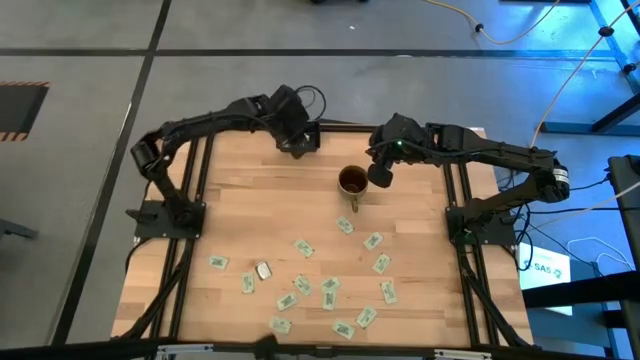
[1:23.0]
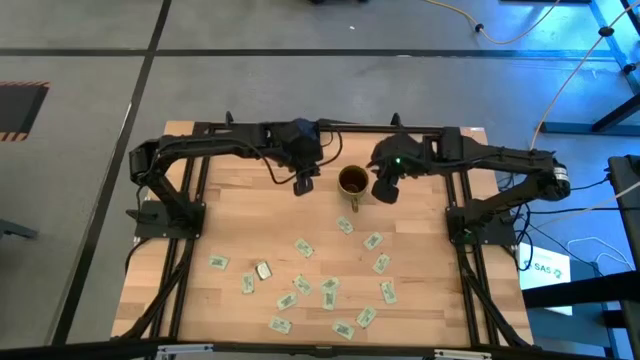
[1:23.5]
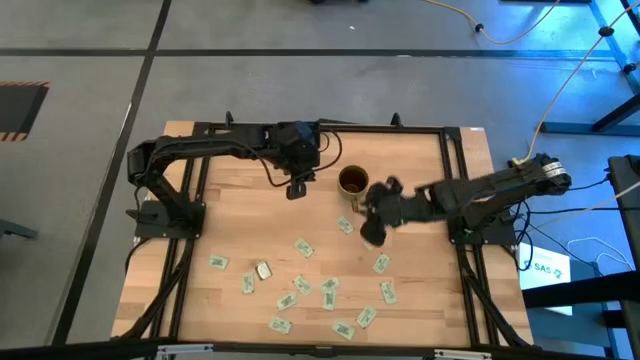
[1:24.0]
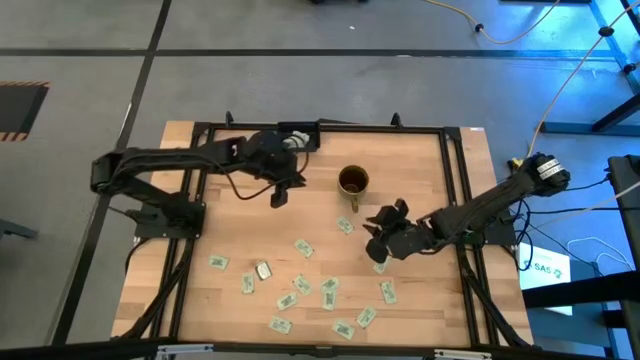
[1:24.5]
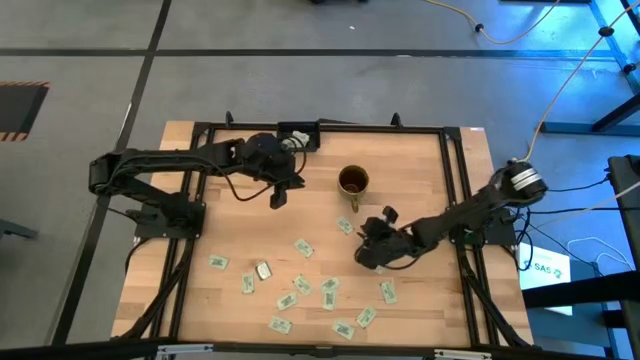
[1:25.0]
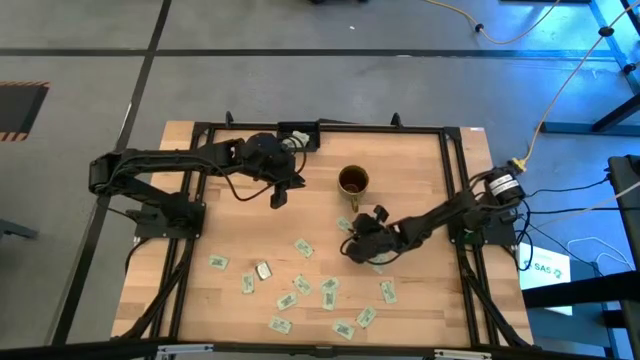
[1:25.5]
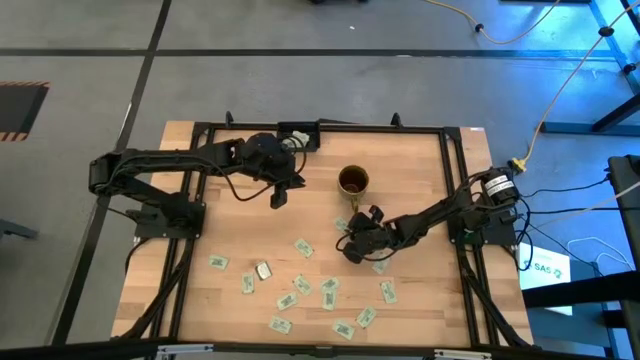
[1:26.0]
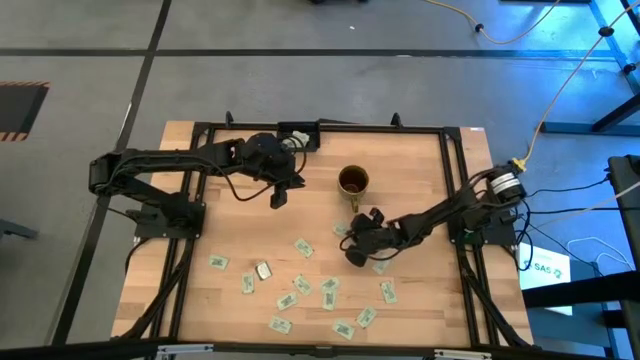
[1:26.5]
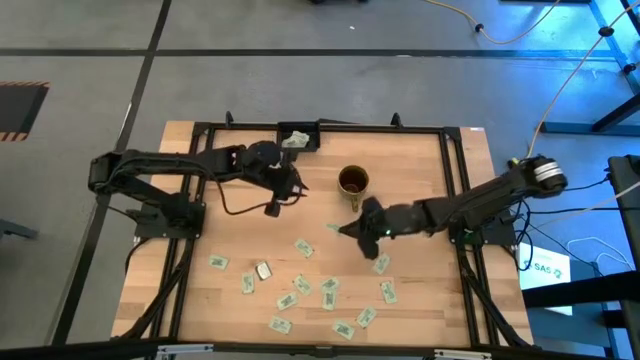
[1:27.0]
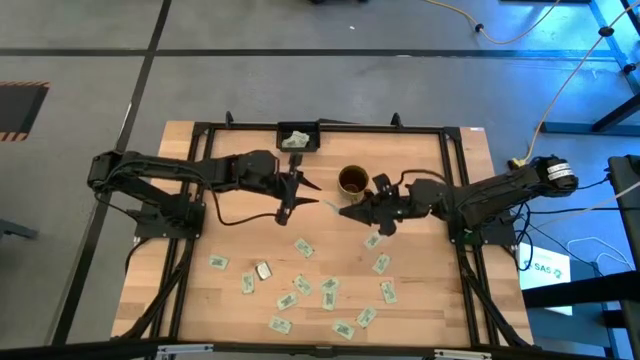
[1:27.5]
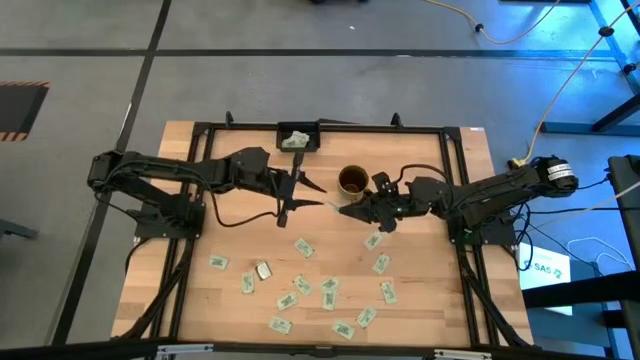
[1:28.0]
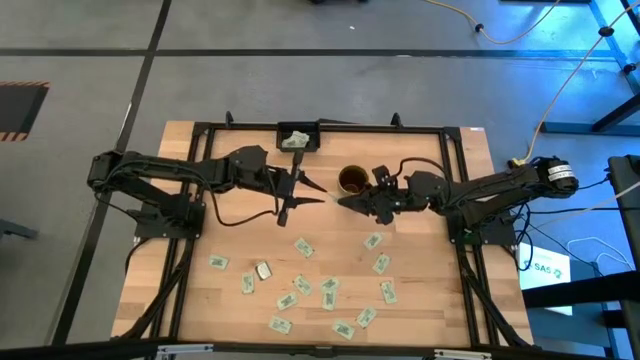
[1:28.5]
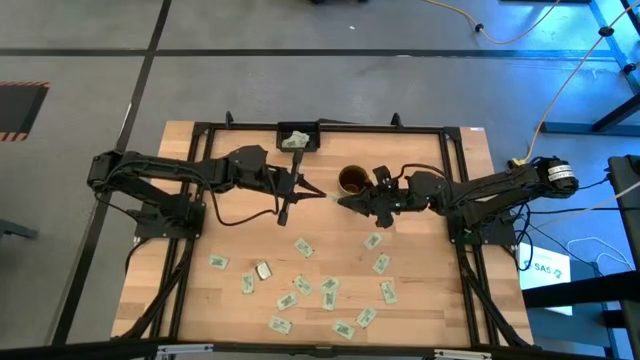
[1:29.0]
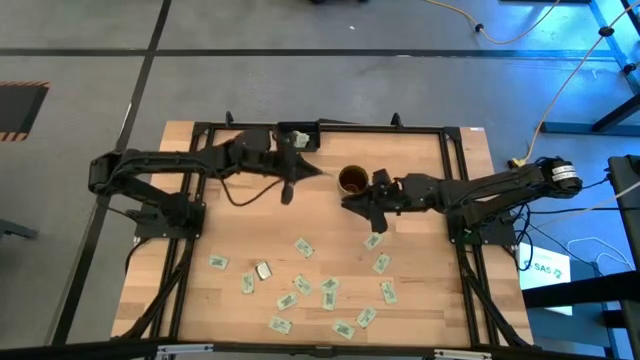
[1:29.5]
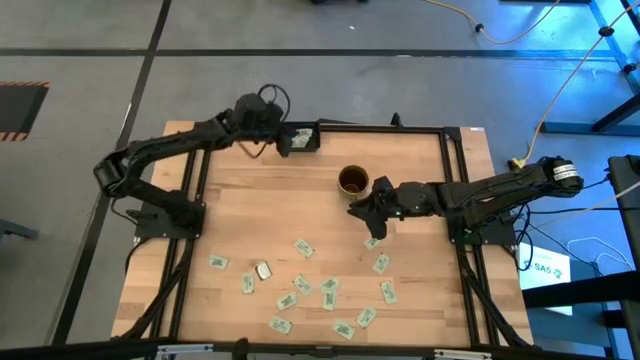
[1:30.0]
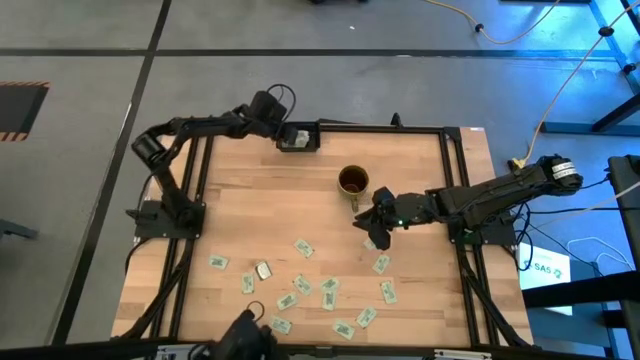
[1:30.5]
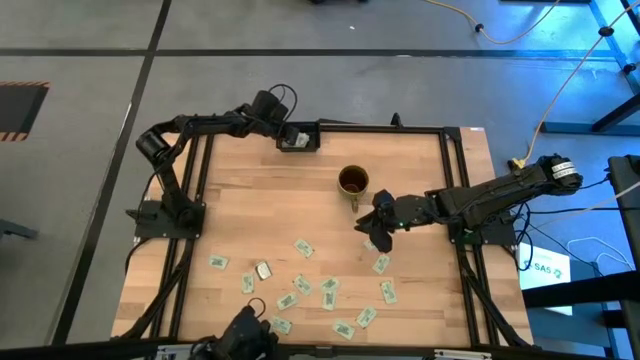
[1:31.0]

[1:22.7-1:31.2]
Task: Pick and place Stevia / Truvia into bins
Put the stevia packet into the black container

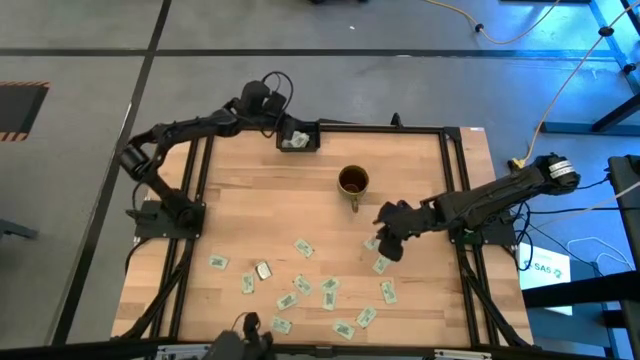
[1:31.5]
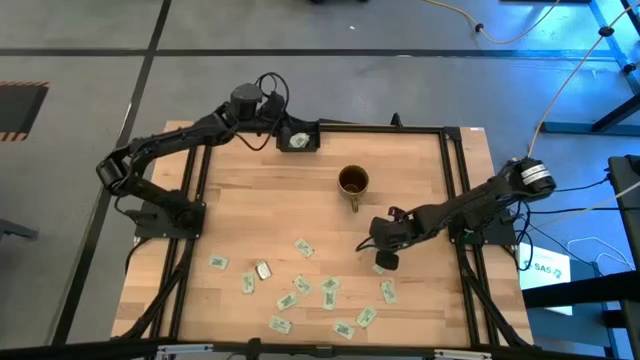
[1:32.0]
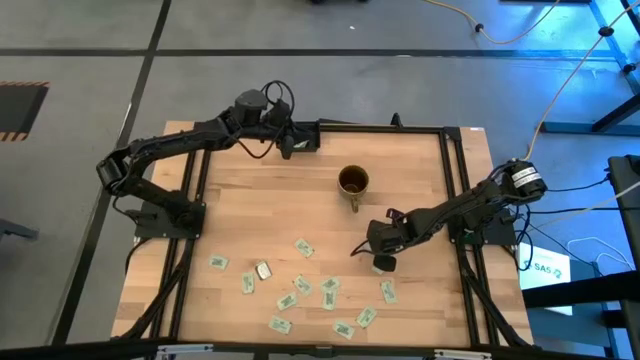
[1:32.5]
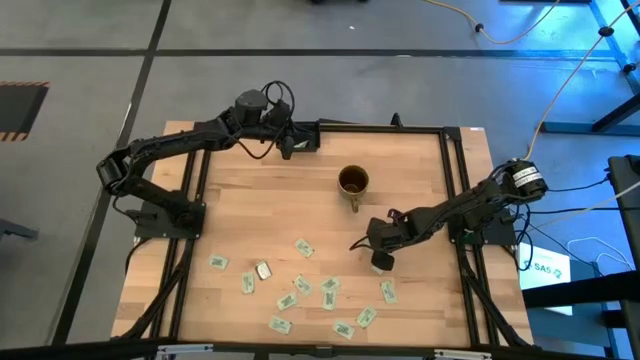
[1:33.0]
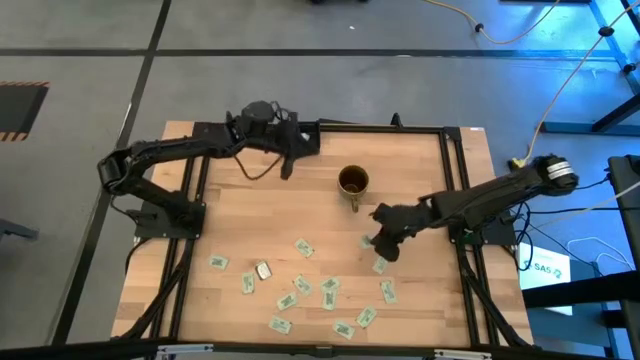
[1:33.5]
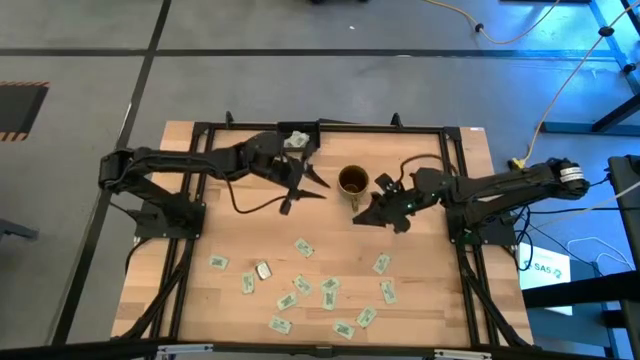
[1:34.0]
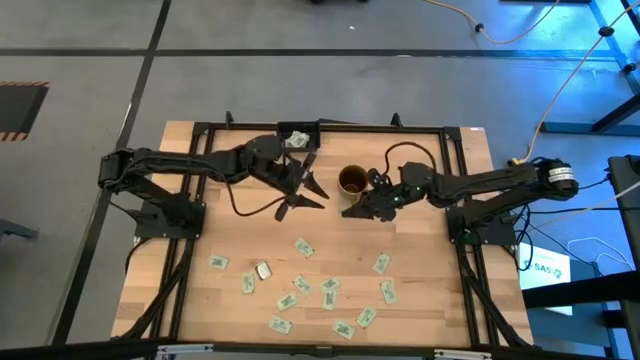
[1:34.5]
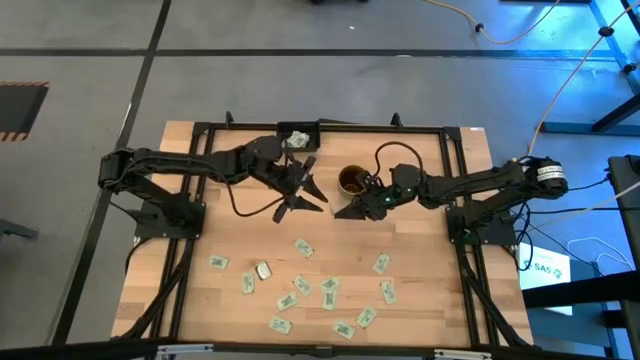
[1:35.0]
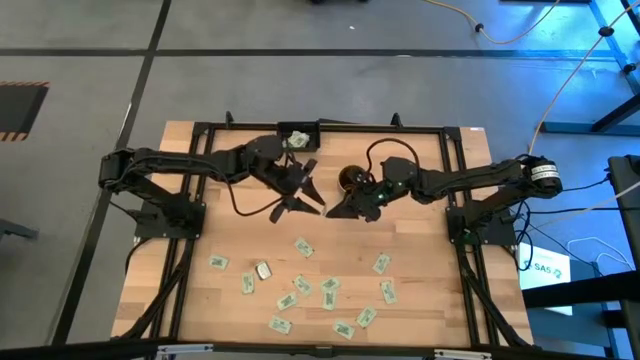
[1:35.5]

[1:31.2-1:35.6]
Put the stevia packet into the black container

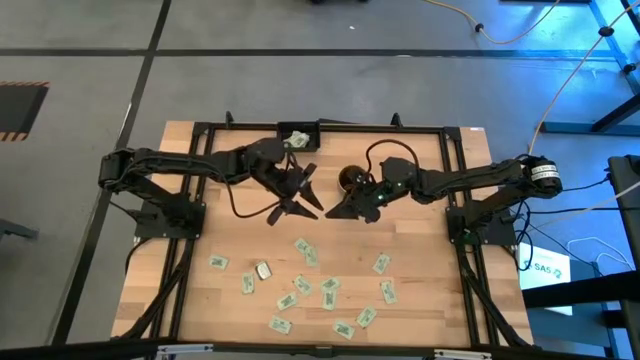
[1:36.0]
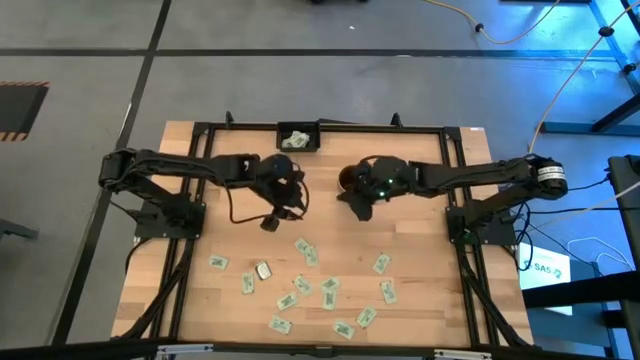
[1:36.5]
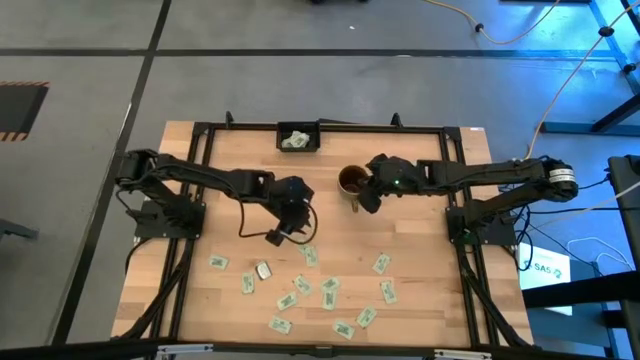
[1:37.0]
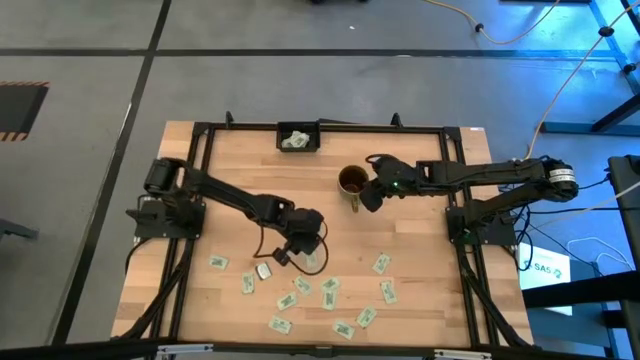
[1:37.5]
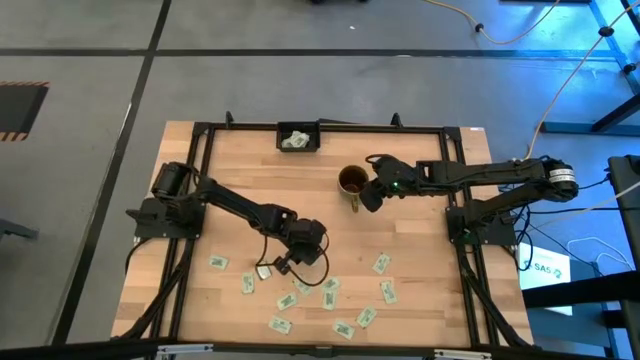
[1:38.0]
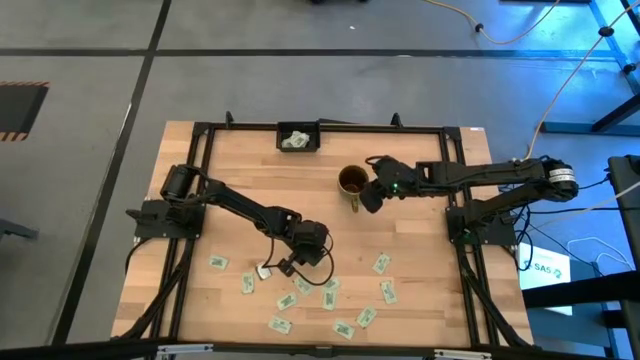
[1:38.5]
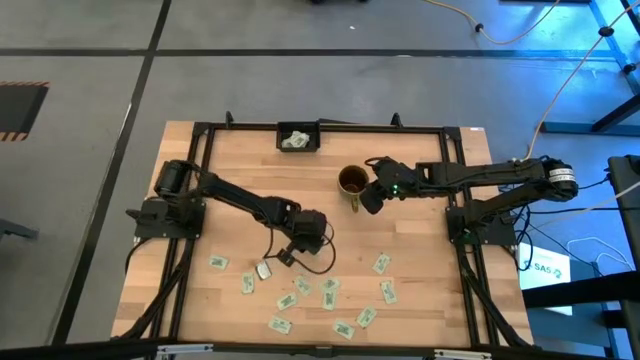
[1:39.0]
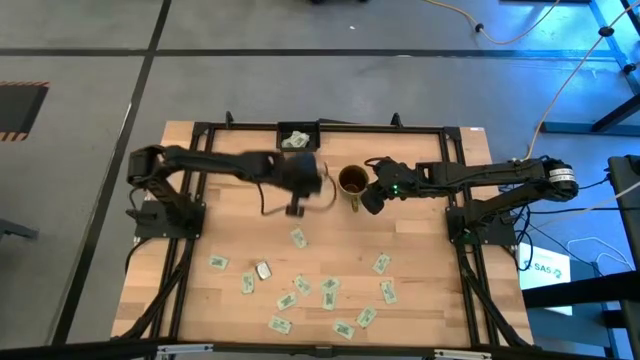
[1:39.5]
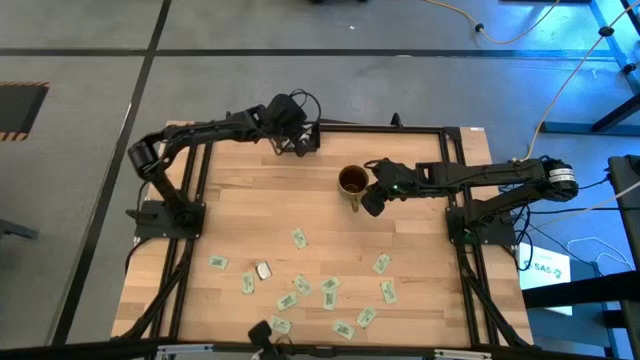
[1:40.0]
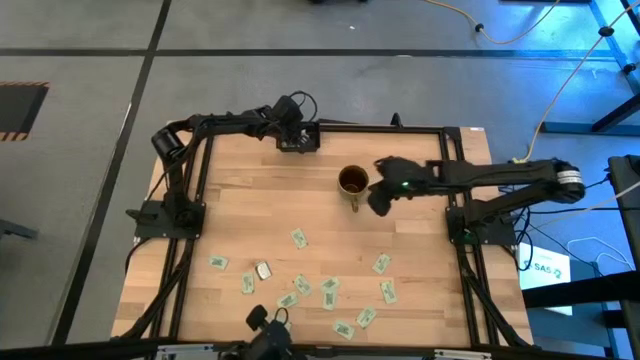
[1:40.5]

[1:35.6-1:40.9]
Put the stevia packet into the black container

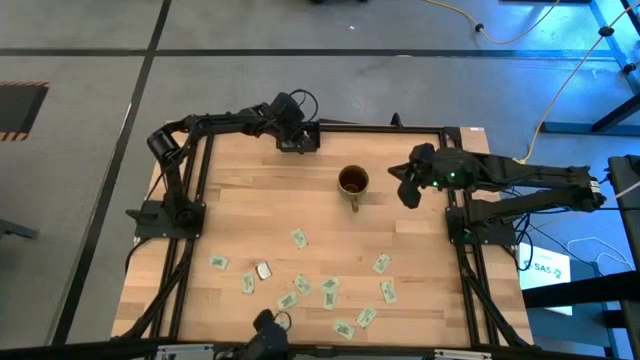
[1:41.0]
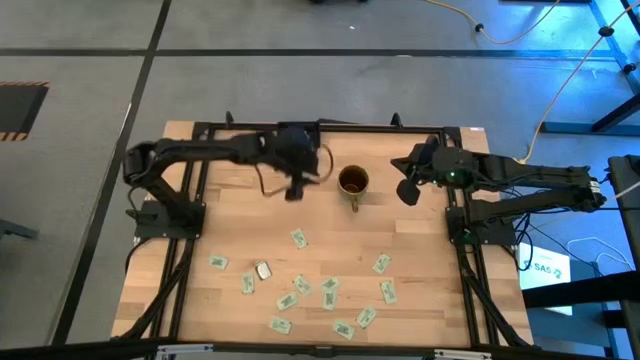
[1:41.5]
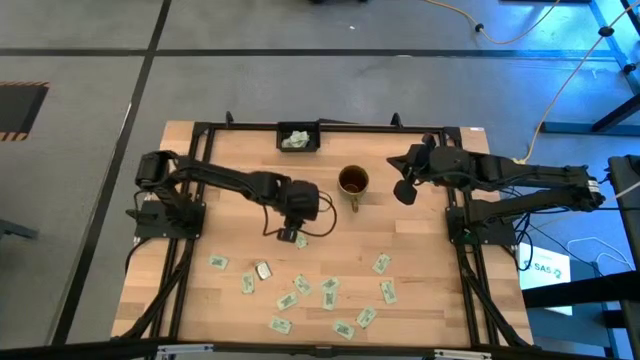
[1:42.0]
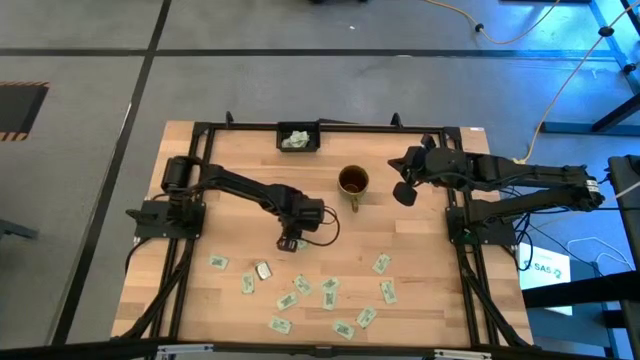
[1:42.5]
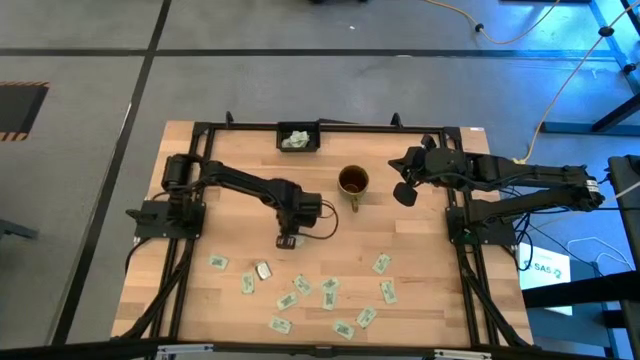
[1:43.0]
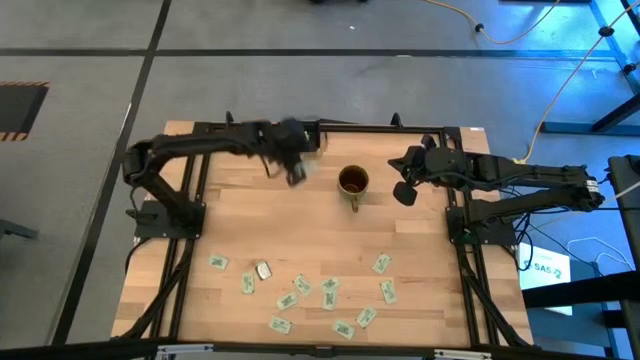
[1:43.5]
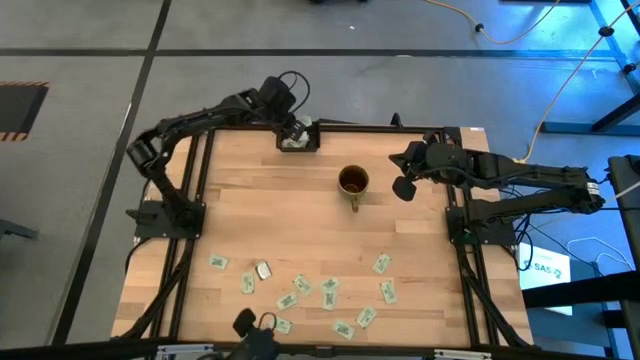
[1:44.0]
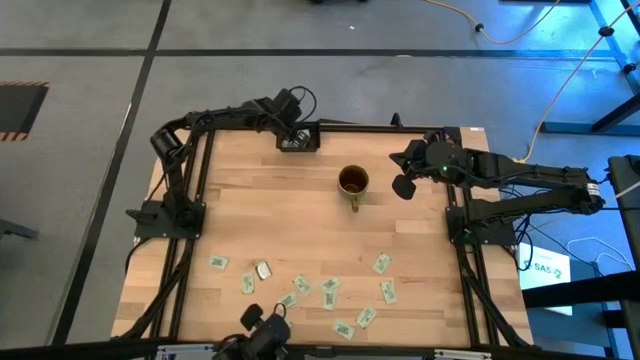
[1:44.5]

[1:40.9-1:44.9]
Put the stevia packet into the black container
